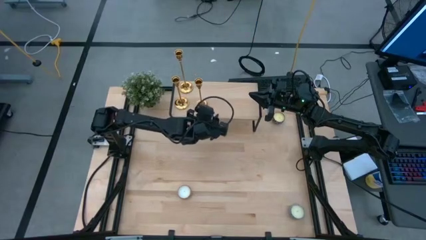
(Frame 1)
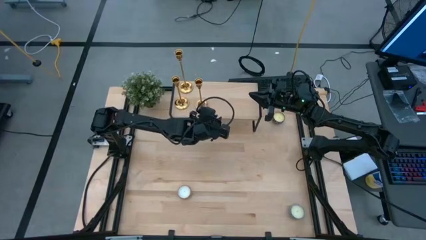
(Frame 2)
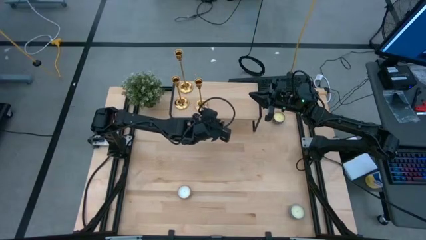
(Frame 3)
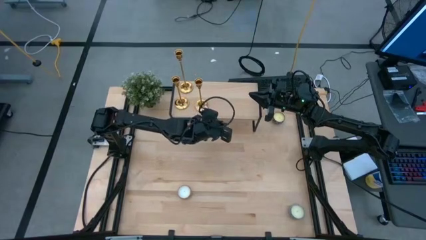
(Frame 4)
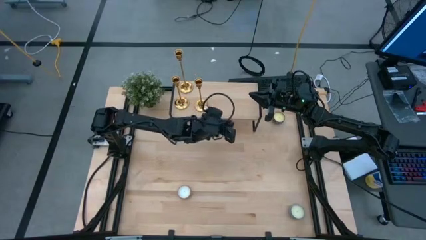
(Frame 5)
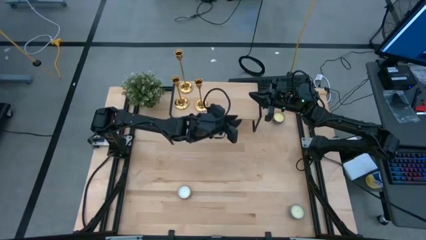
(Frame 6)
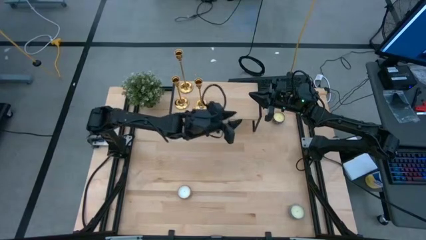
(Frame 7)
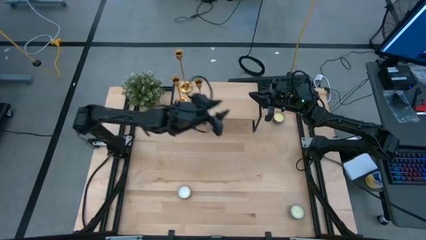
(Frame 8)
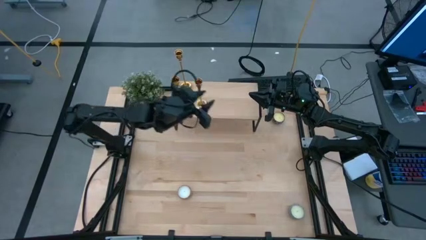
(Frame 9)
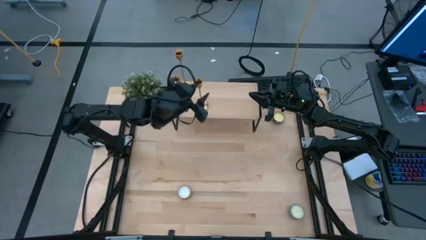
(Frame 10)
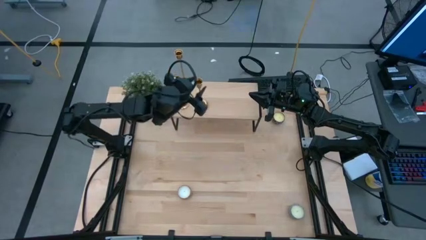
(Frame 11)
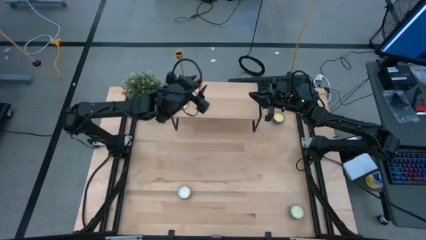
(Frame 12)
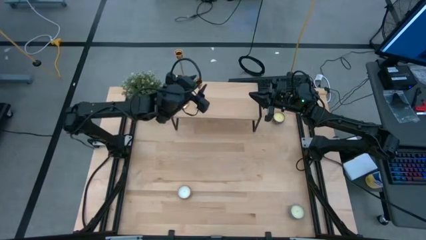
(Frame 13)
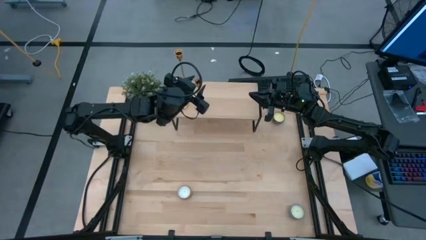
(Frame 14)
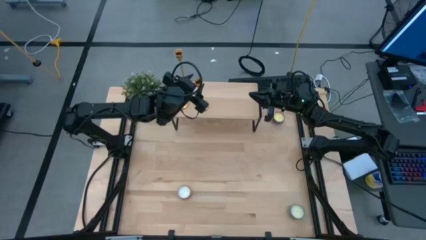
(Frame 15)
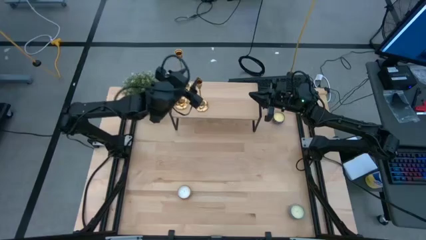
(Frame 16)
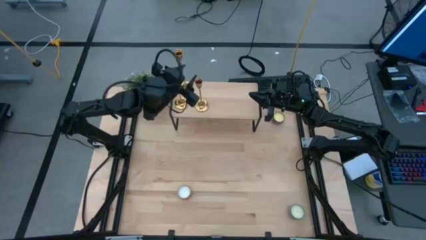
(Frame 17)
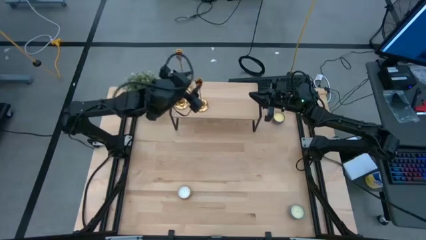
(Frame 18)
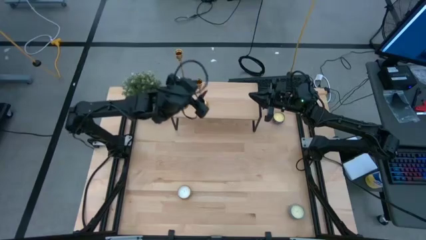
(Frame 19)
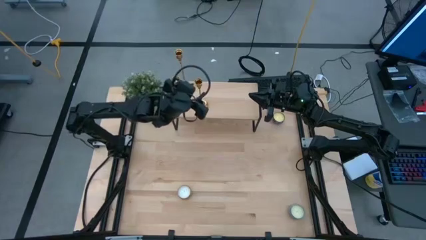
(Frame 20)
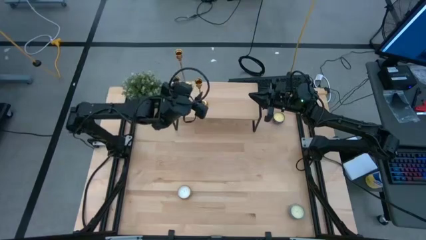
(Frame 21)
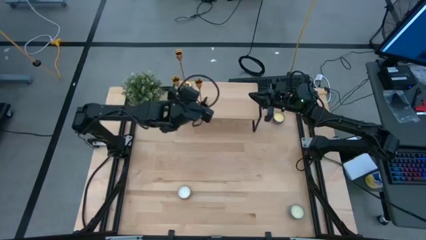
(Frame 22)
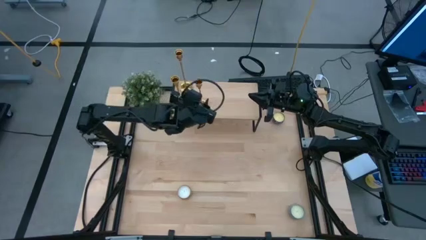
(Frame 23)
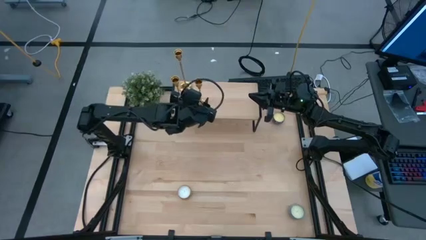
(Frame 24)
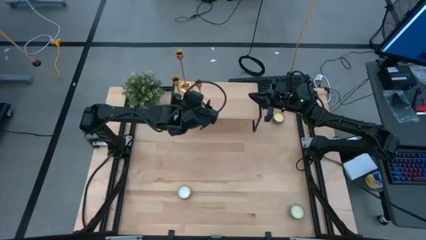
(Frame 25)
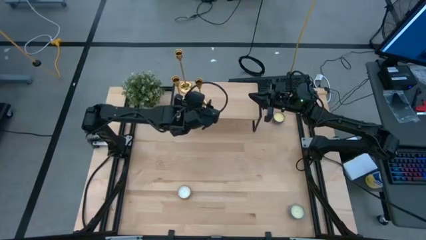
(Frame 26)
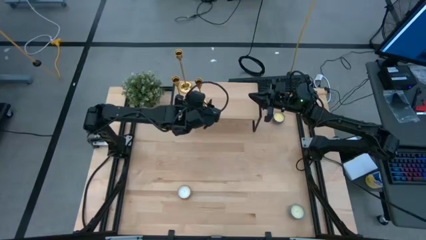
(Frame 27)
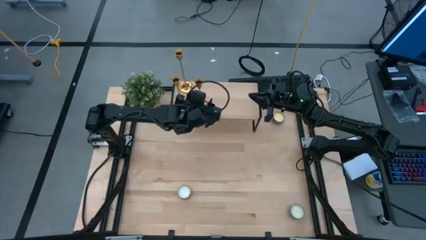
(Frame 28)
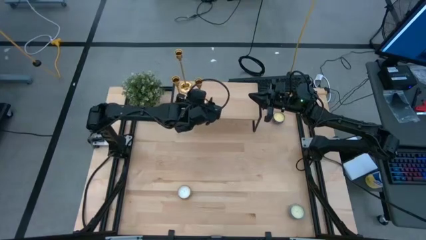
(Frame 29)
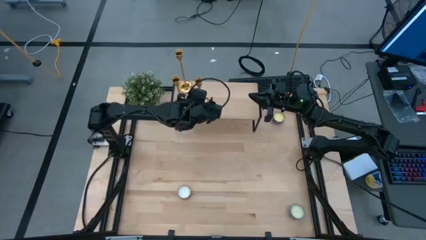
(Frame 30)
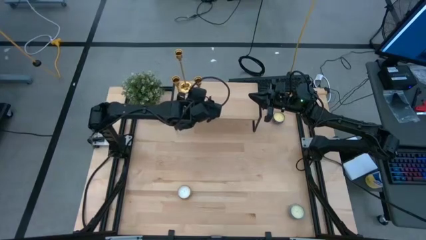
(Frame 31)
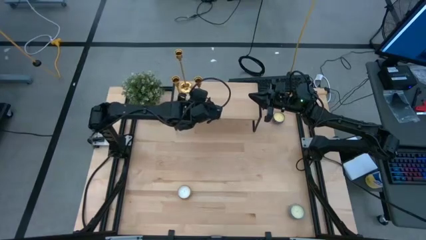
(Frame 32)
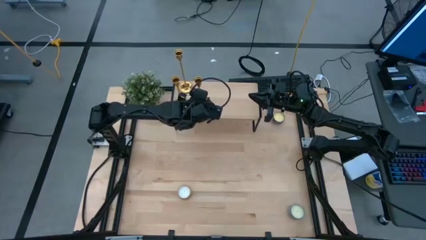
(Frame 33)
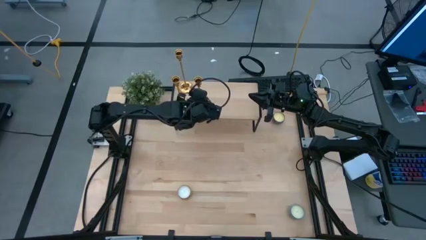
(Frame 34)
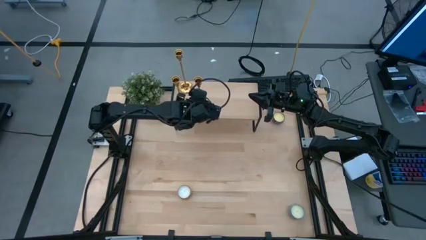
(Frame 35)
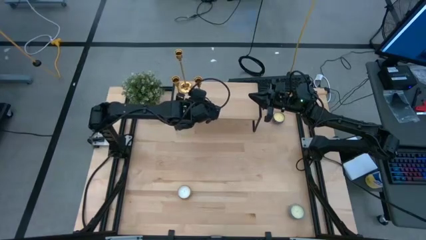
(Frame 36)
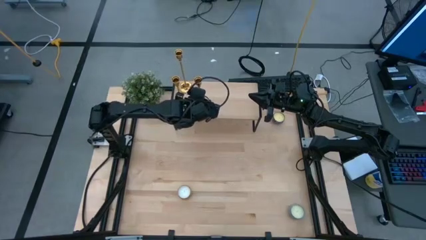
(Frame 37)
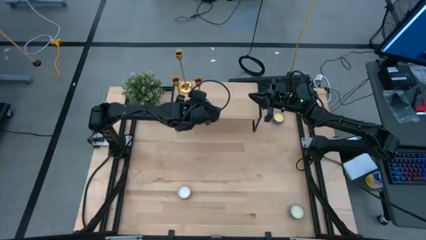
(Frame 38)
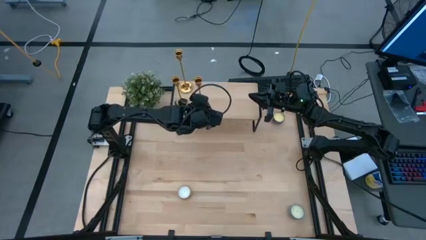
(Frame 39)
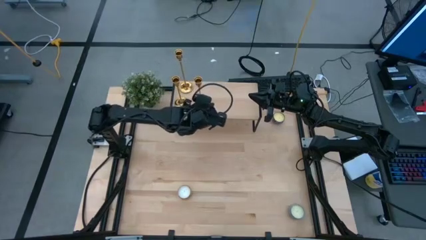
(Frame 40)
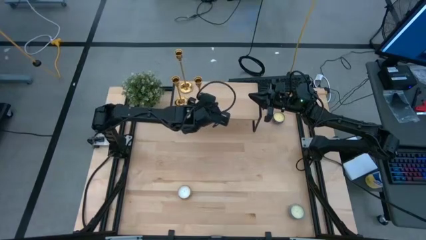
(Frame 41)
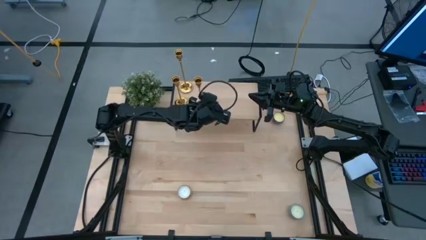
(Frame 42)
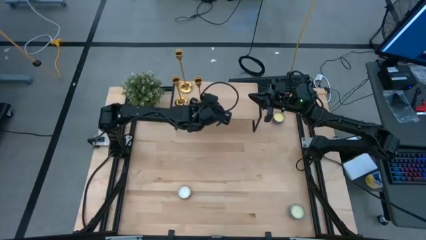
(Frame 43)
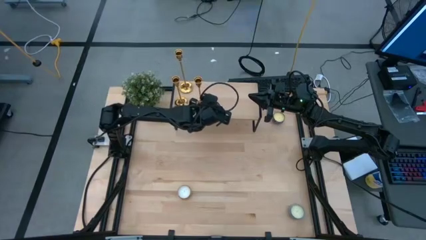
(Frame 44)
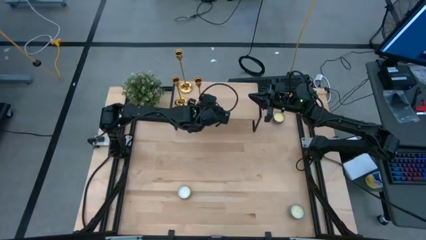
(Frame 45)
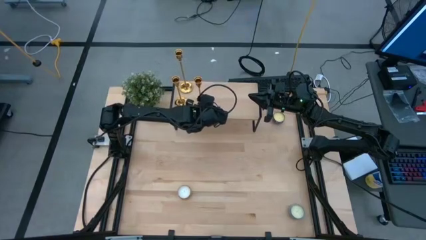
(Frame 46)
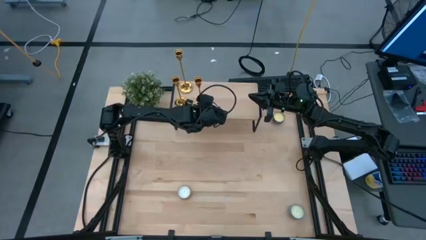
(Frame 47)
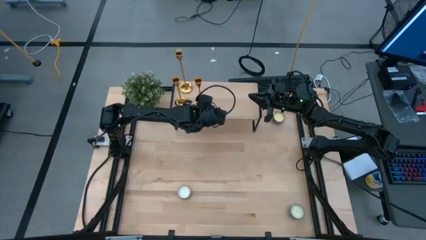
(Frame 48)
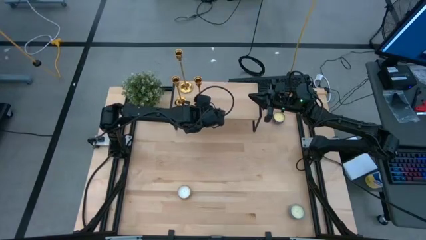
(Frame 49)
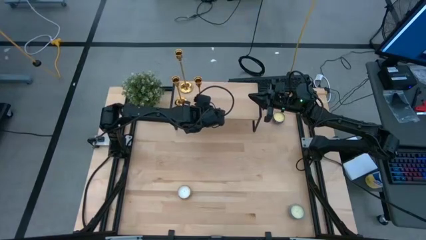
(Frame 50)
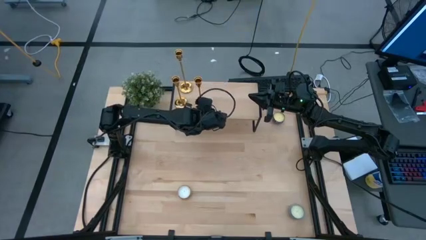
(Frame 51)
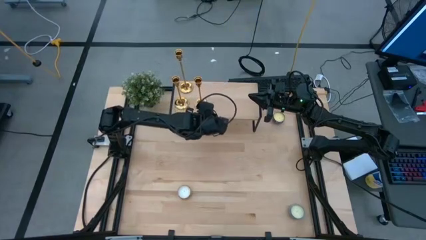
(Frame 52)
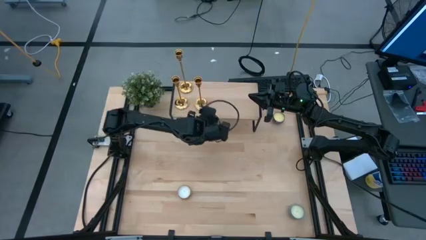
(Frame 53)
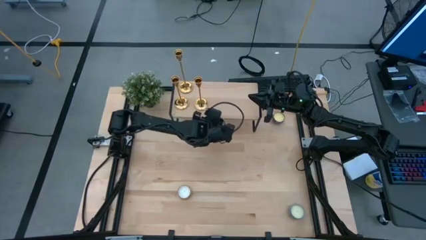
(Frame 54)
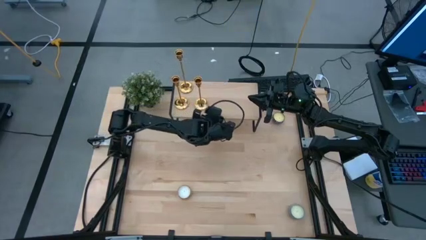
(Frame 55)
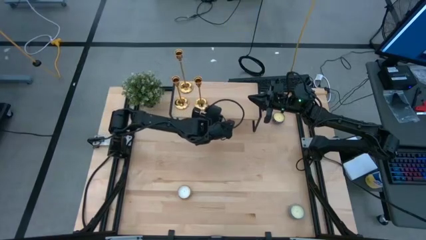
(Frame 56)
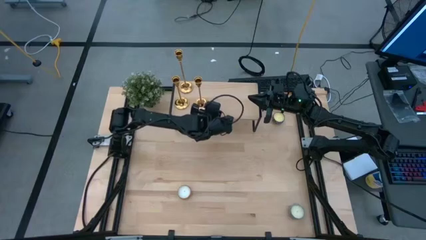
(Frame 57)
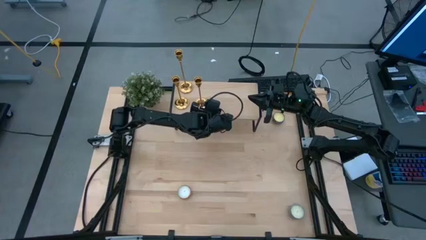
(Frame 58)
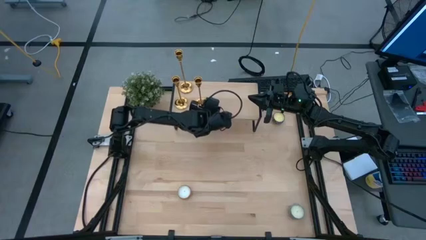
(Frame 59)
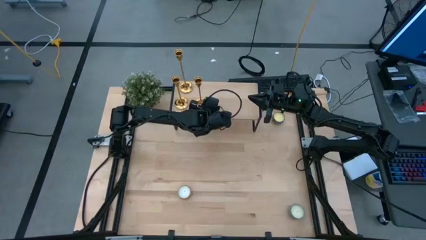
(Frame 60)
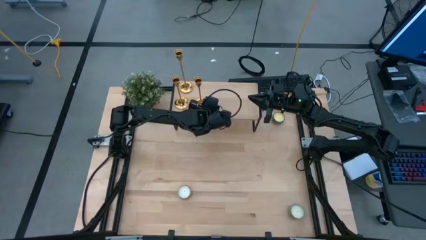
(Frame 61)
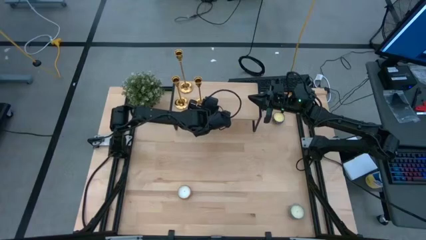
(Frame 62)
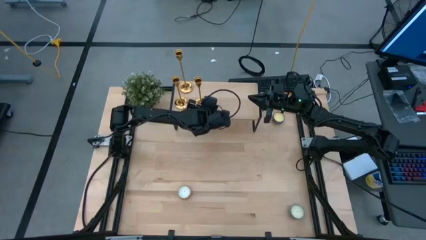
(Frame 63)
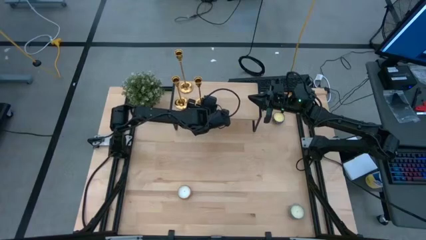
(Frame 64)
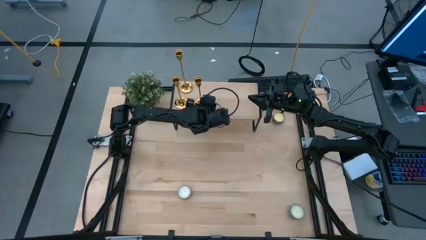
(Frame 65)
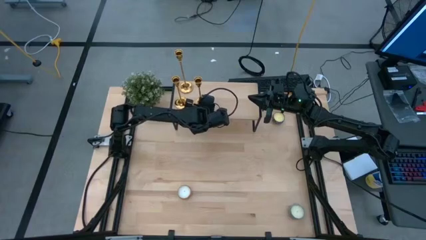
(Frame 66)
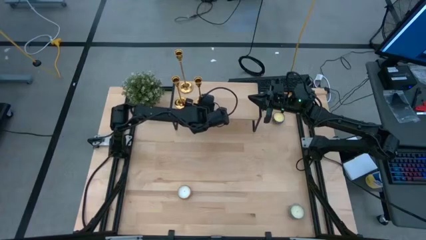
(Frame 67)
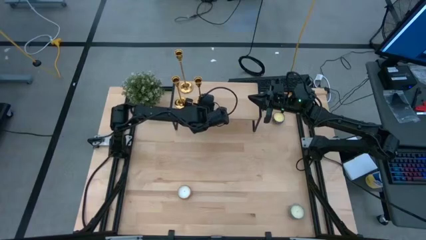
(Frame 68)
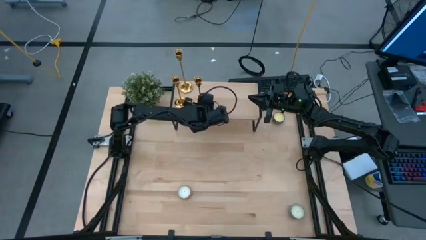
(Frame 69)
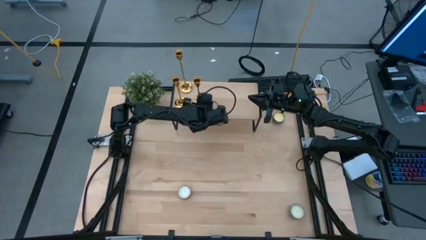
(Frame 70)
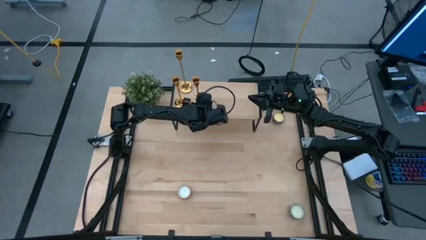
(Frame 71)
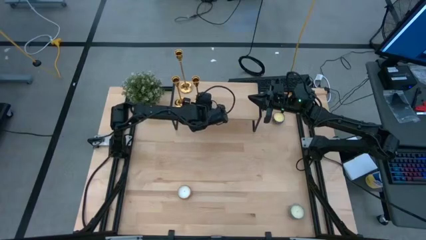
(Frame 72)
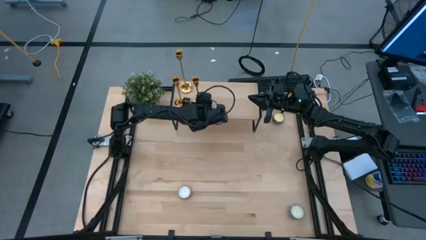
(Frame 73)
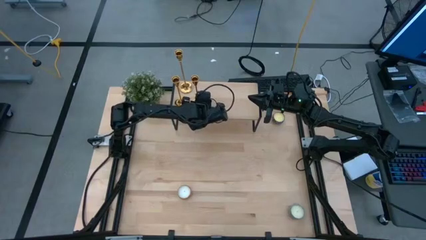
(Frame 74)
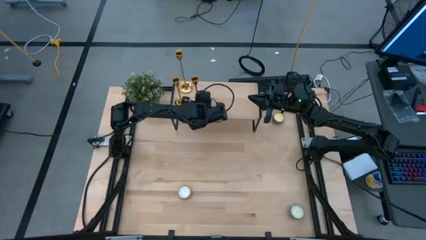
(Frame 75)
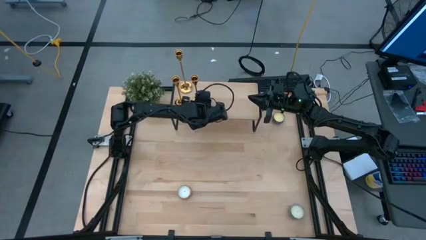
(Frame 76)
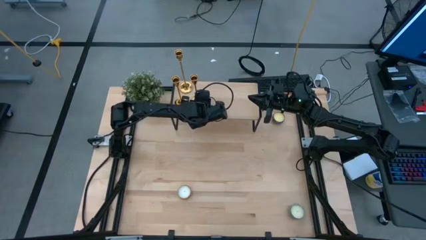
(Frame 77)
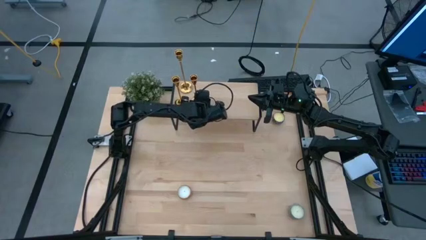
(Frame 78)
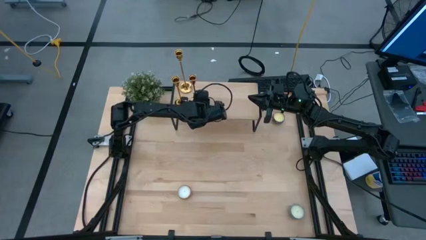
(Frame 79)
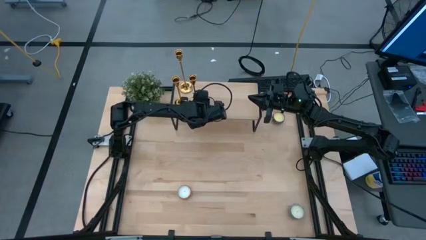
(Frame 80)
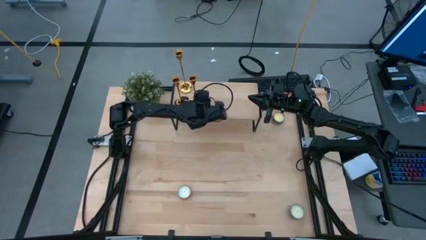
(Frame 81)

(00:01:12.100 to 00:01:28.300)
Task: Pick & Place candle stick holders
Put the gold candle holder on the shelf
